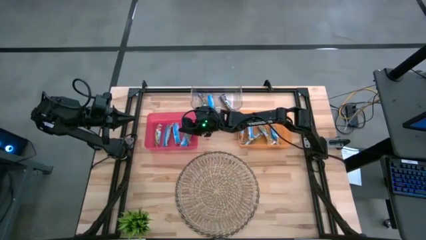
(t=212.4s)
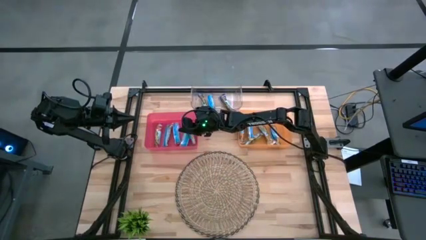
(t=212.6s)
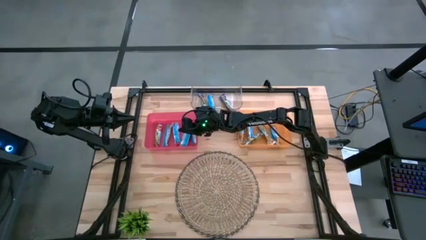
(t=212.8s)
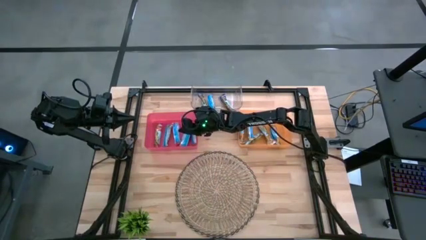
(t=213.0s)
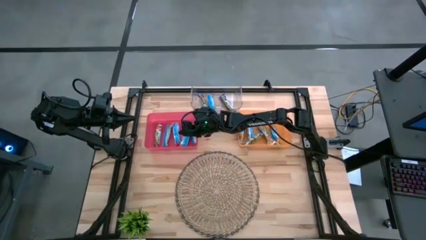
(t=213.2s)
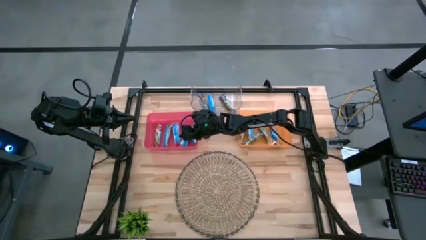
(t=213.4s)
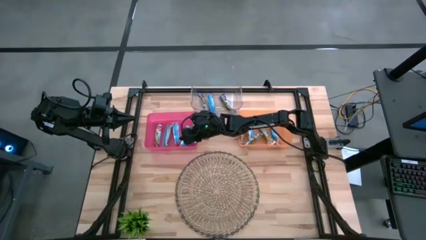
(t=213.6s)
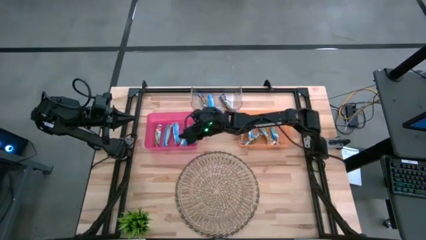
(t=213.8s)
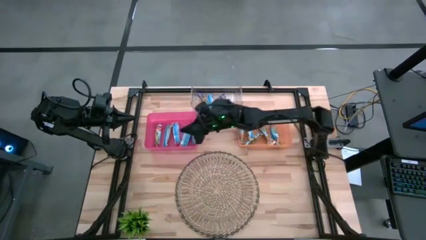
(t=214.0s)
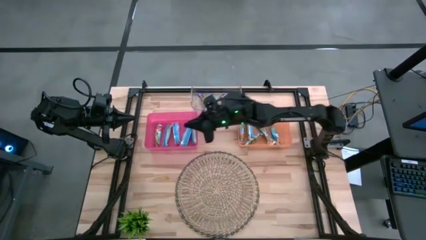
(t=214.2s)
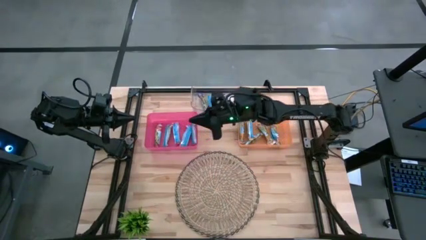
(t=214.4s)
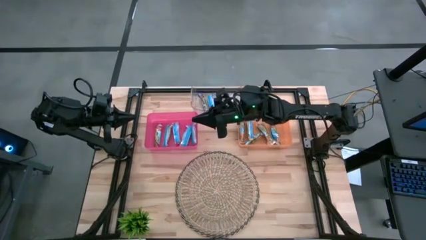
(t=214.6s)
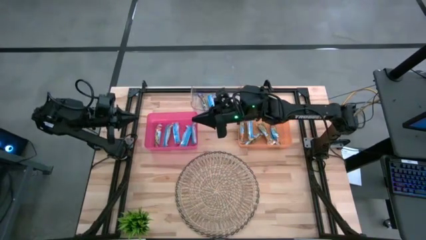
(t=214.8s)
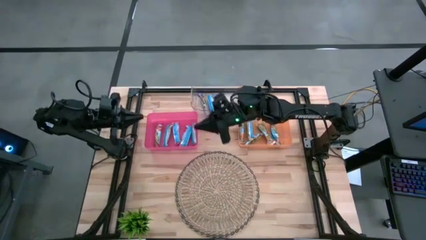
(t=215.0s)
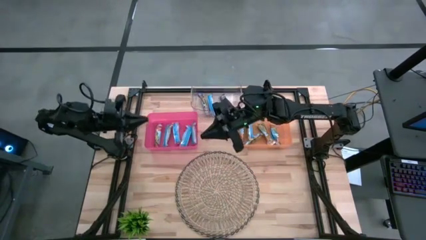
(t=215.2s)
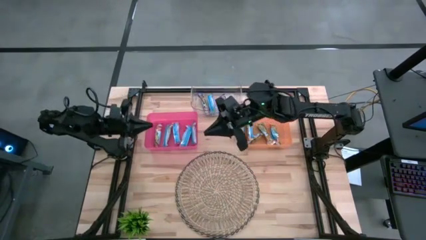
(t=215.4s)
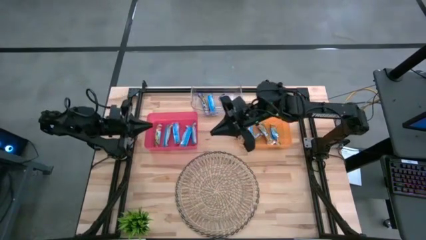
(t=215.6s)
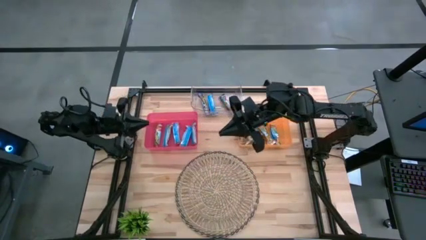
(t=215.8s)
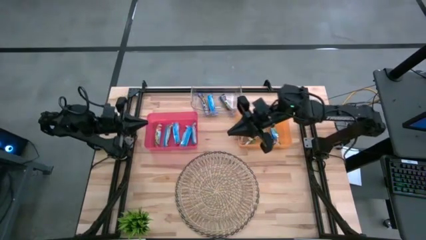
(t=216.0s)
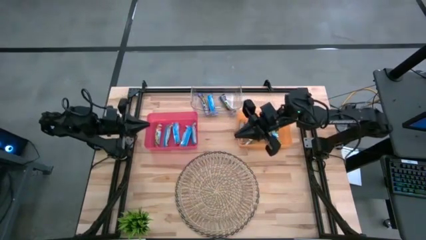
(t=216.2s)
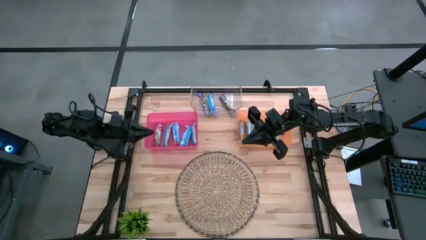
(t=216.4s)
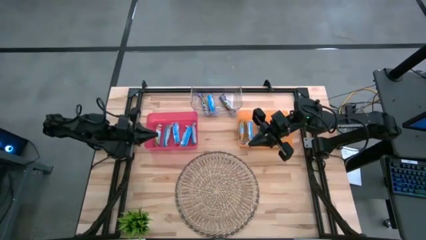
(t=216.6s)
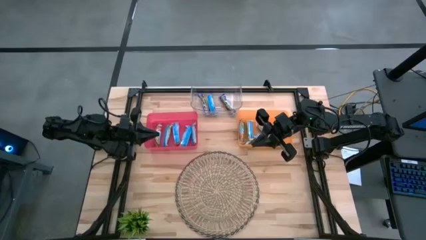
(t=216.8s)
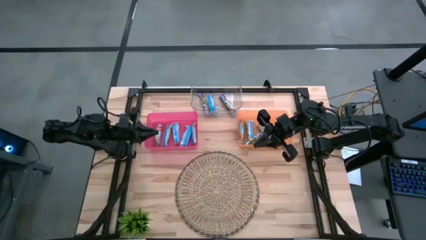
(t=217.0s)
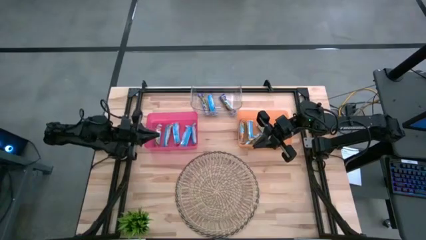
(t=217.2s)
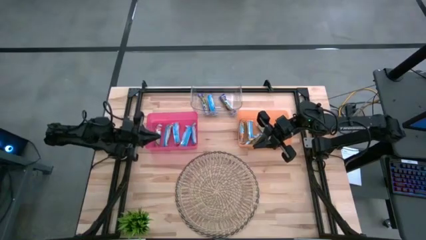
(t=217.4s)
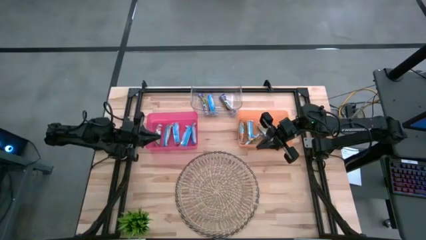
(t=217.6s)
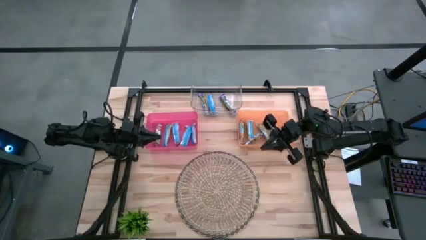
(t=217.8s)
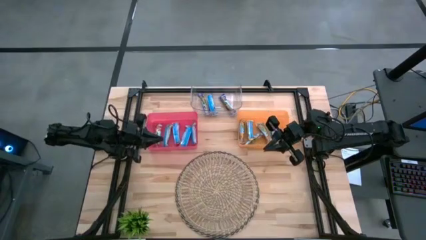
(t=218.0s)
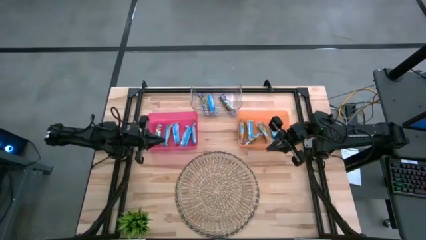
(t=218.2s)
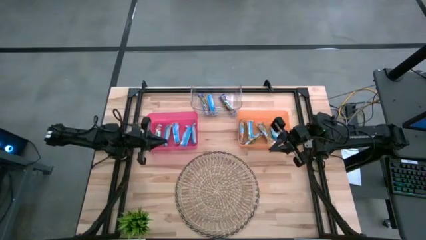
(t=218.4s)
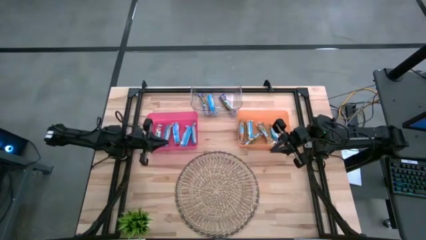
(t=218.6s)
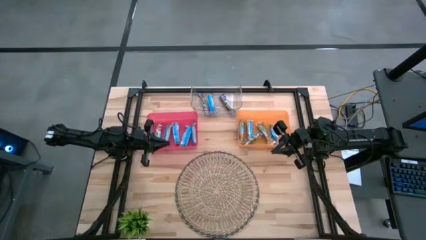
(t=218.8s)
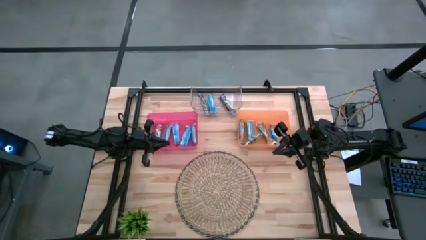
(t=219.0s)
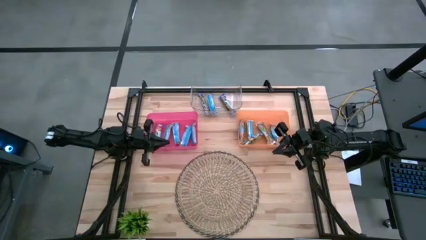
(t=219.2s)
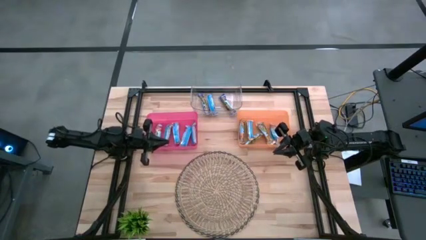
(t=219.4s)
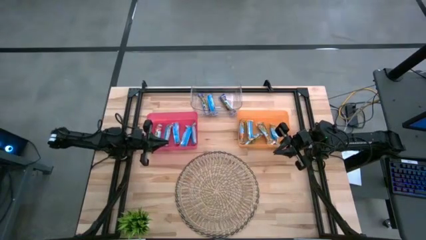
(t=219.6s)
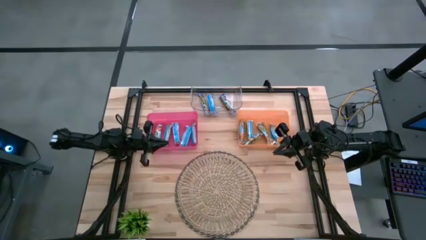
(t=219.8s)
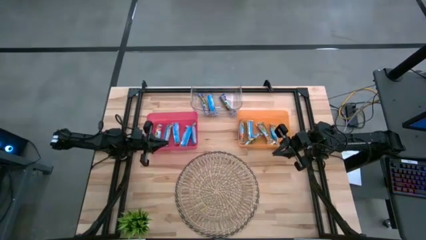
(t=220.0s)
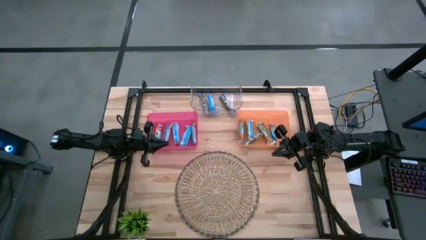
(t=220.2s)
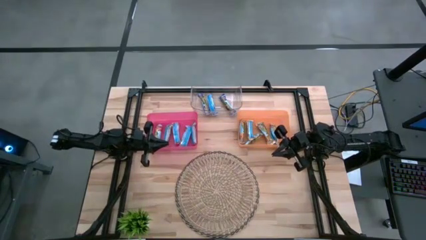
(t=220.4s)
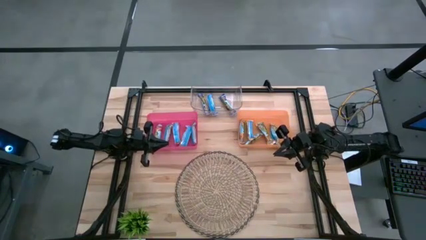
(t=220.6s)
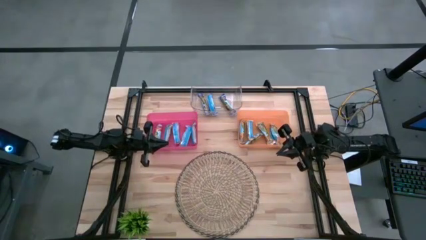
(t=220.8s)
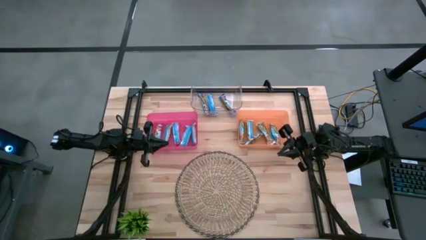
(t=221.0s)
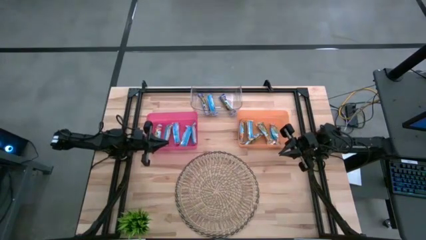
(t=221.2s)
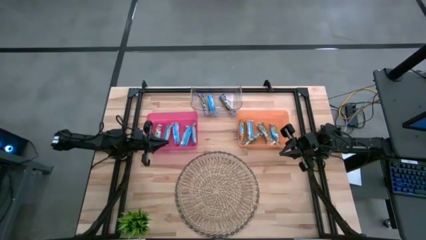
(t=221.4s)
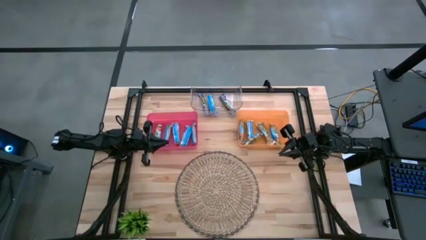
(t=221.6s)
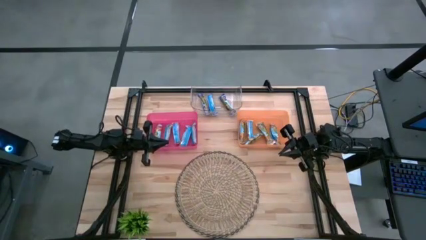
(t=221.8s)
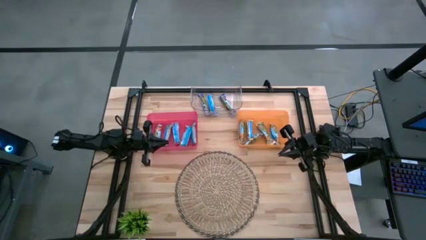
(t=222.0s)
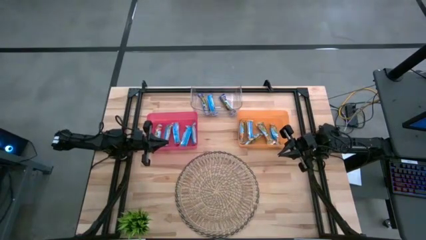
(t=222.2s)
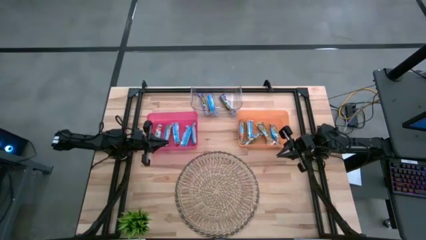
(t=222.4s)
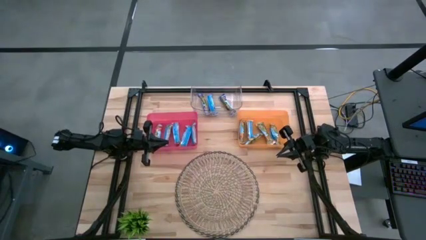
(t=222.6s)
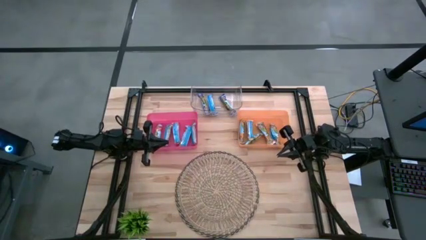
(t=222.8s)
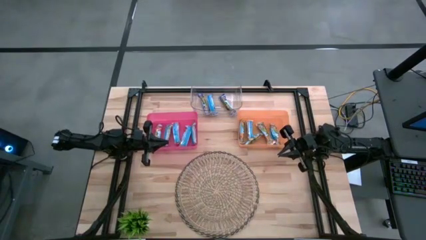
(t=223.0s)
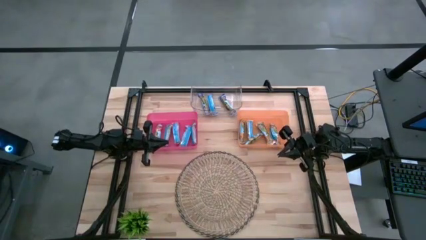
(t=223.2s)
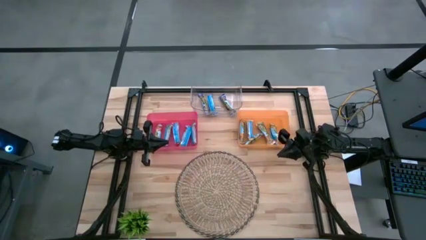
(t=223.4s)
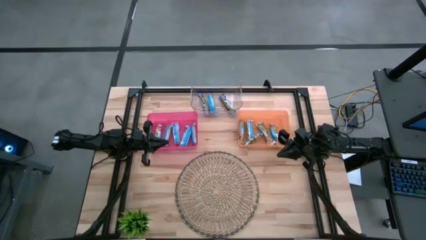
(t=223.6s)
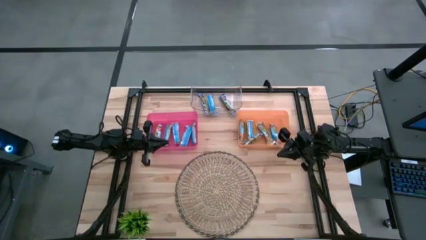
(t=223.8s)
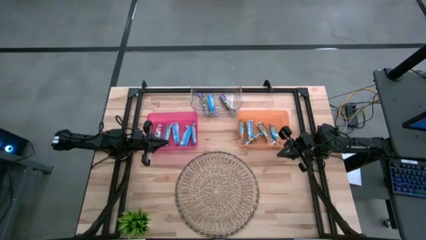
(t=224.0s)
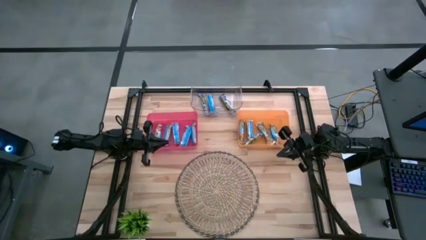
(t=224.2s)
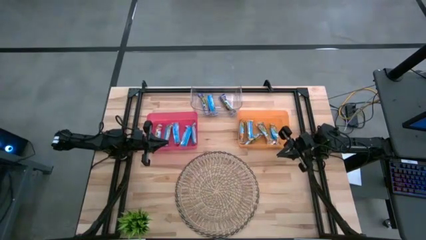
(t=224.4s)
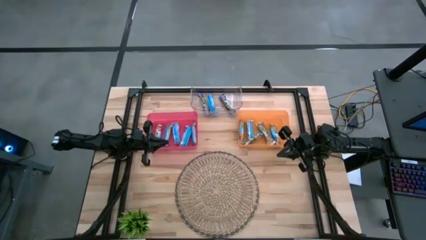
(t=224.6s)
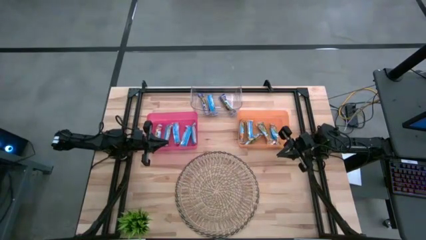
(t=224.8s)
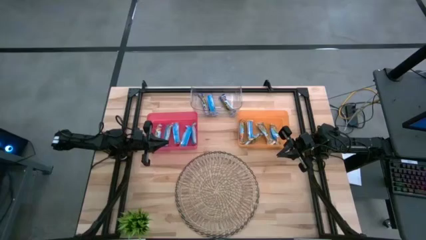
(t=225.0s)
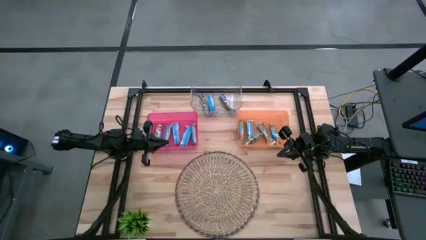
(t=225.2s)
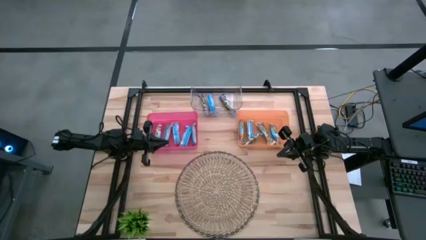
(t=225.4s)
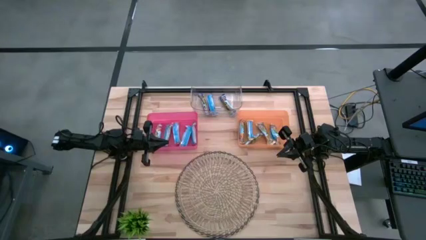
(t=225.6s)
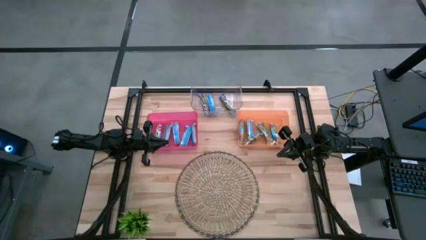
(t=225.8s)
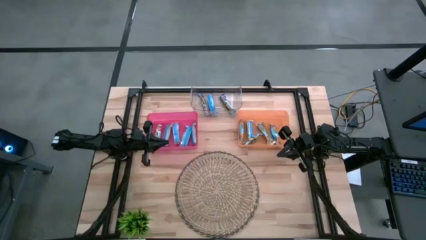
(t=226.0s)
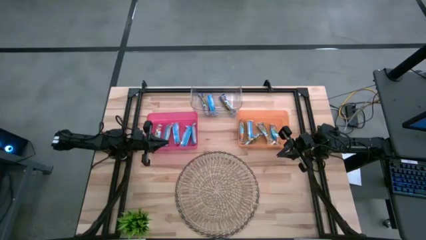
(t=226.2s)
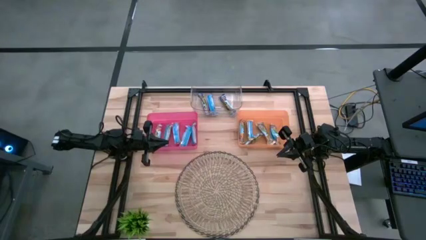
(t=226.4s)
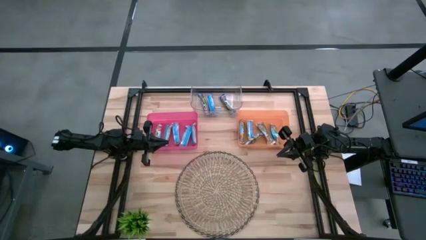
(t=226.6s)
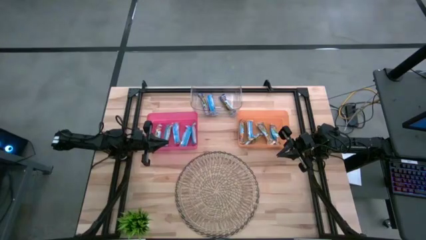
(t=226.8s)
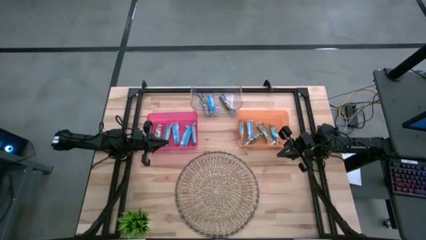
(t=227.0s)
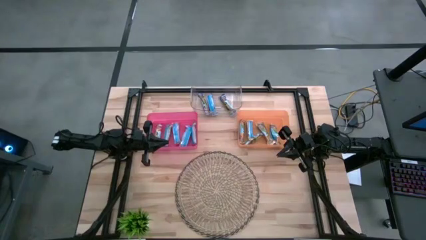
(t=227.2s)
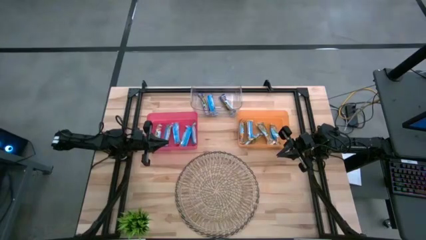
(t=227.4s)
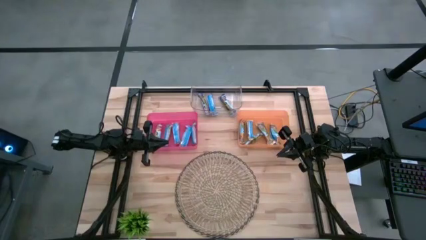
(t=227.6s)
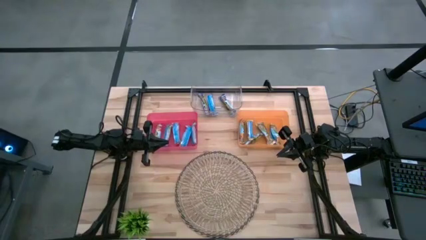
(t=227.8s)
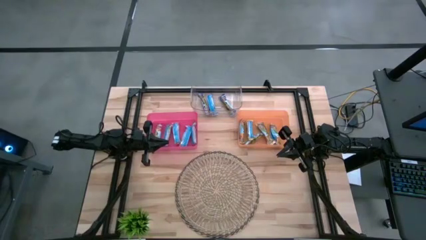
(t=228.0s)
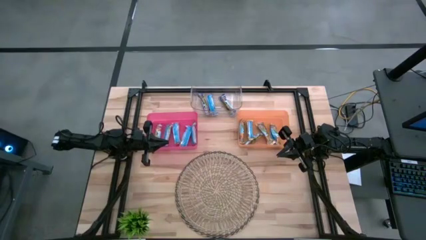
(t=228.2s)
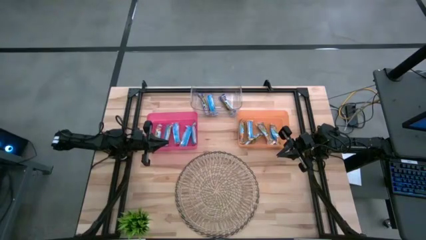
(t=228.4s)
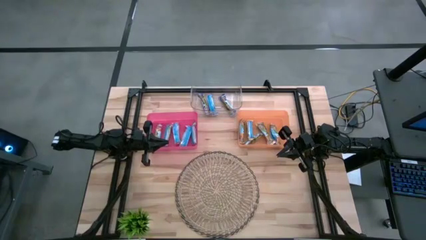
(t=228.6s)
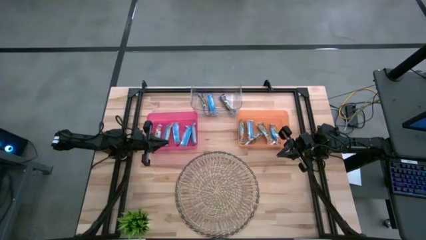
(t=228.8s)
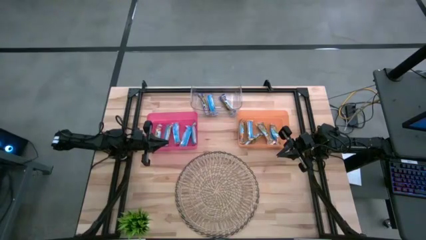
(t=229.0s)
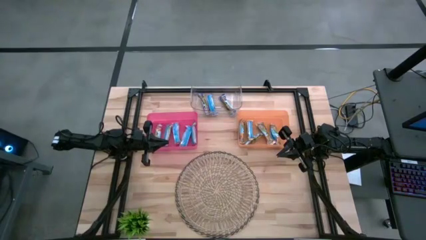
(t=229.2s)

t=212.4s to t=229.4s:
Task: Pick and place Granola Bars by type
Return to Home Position
